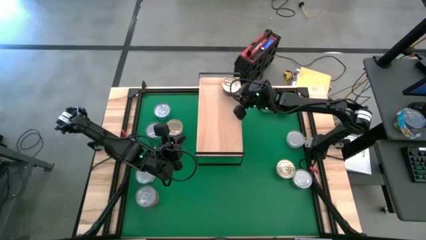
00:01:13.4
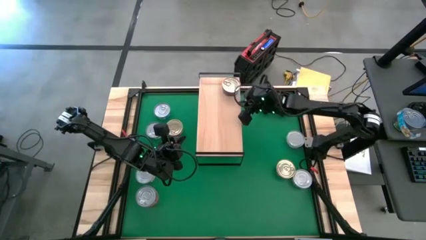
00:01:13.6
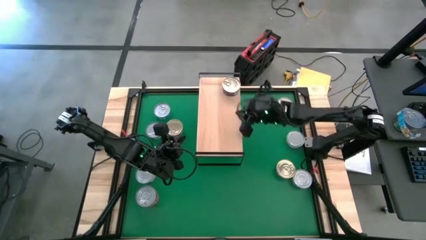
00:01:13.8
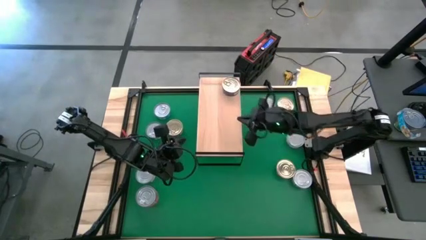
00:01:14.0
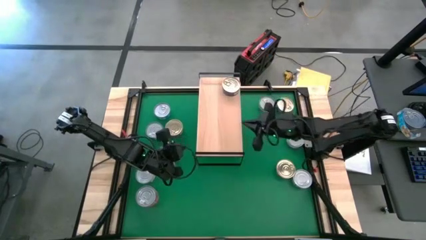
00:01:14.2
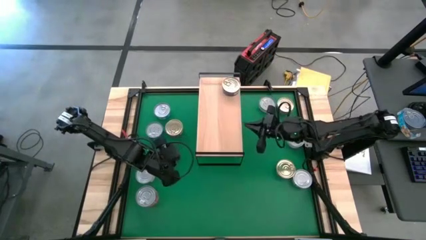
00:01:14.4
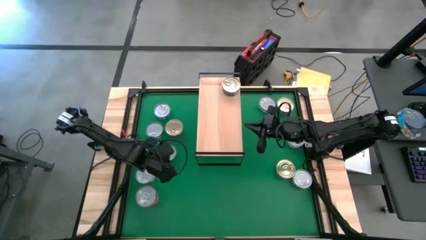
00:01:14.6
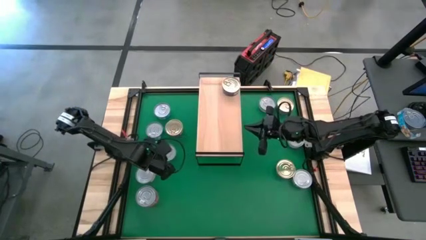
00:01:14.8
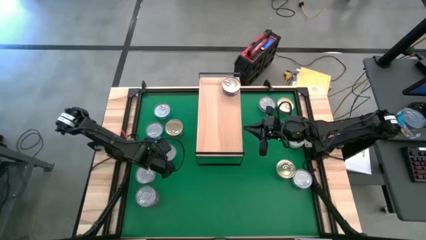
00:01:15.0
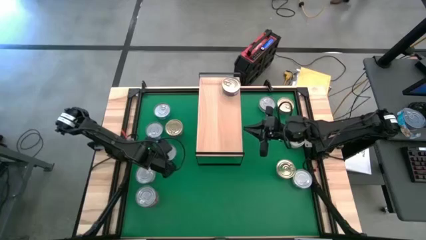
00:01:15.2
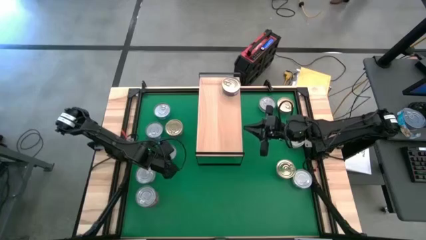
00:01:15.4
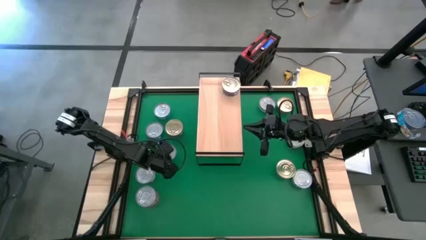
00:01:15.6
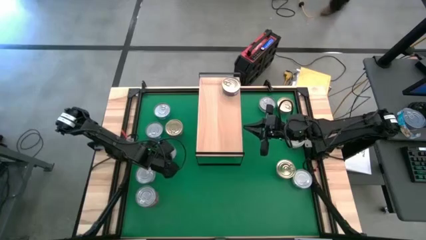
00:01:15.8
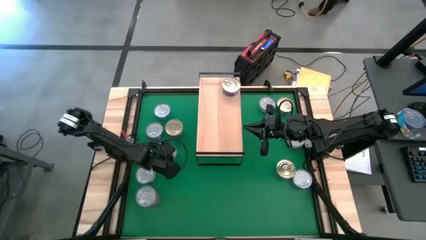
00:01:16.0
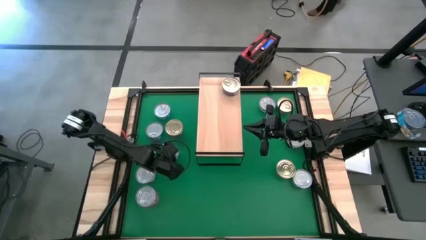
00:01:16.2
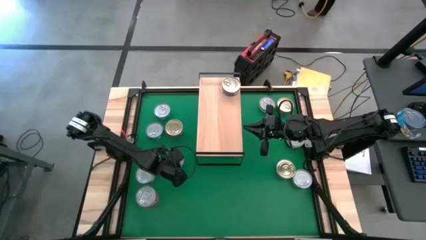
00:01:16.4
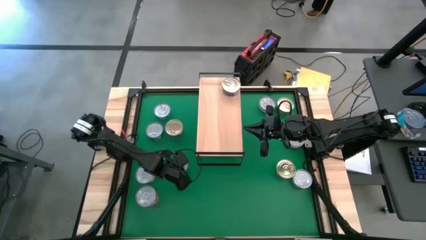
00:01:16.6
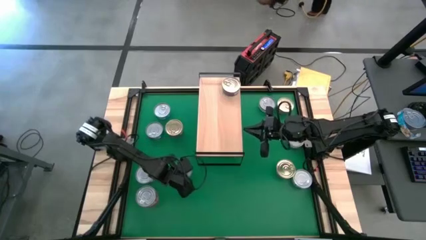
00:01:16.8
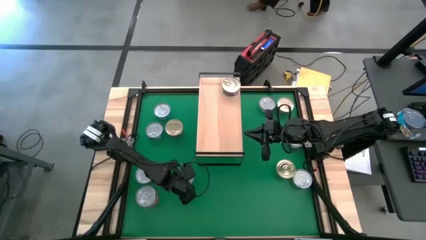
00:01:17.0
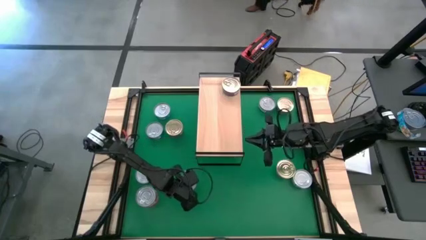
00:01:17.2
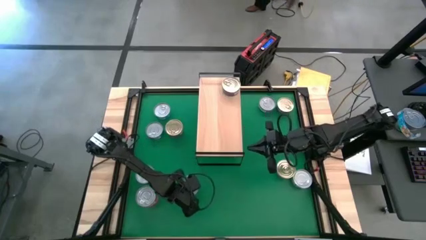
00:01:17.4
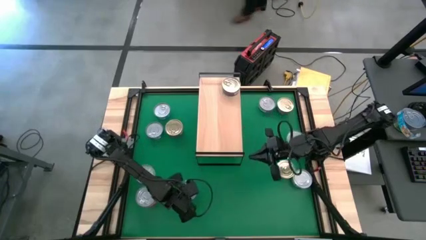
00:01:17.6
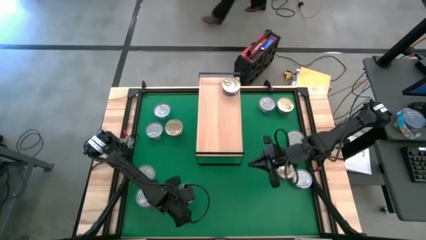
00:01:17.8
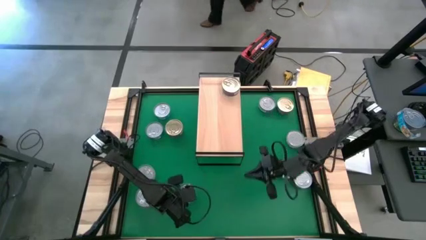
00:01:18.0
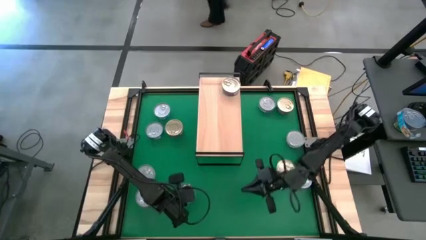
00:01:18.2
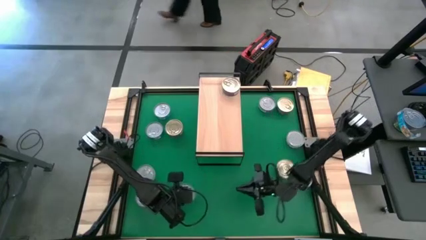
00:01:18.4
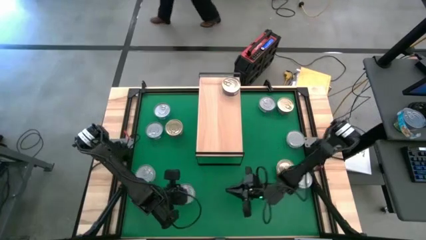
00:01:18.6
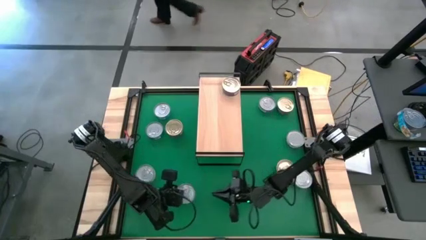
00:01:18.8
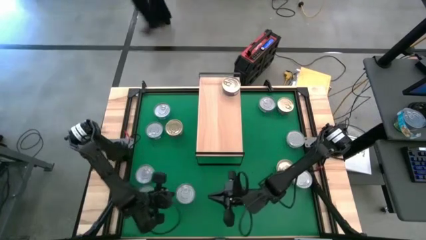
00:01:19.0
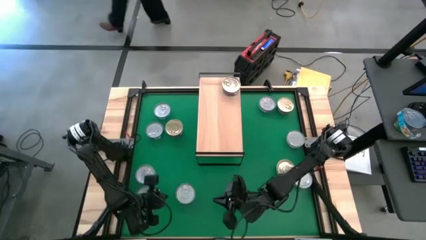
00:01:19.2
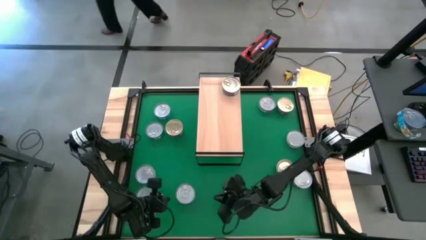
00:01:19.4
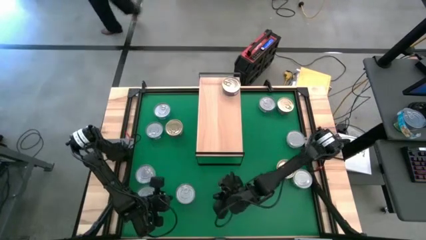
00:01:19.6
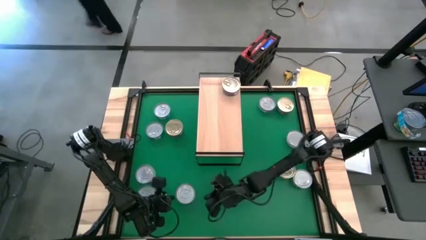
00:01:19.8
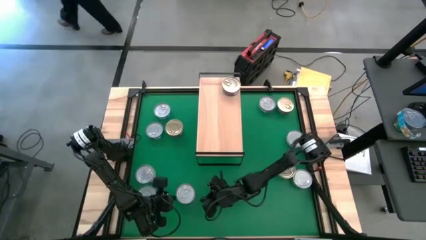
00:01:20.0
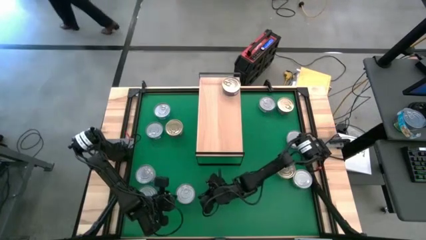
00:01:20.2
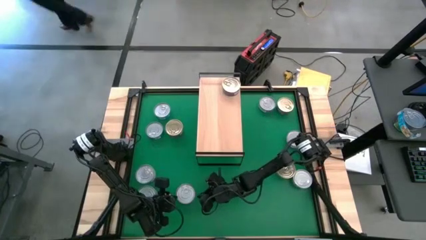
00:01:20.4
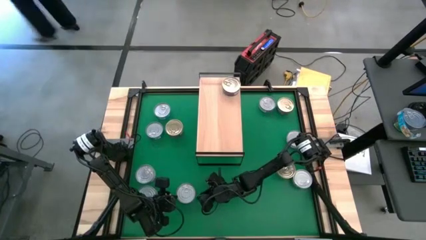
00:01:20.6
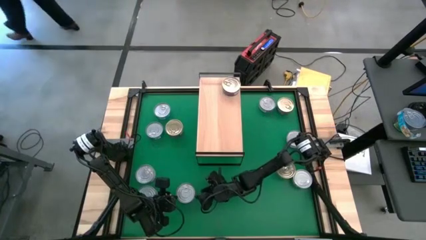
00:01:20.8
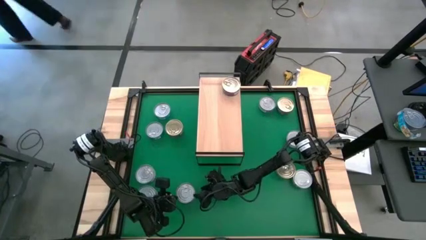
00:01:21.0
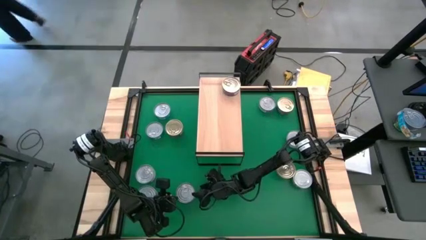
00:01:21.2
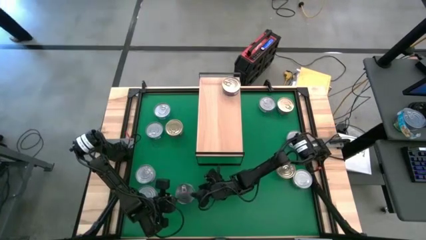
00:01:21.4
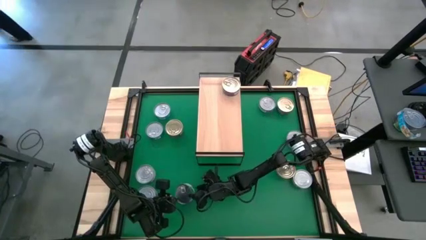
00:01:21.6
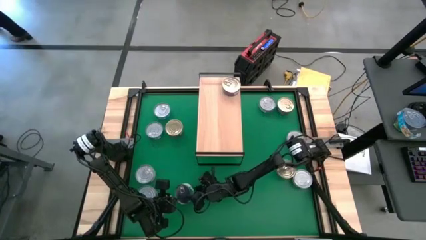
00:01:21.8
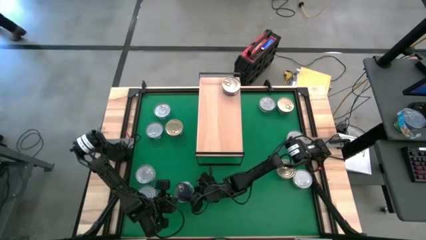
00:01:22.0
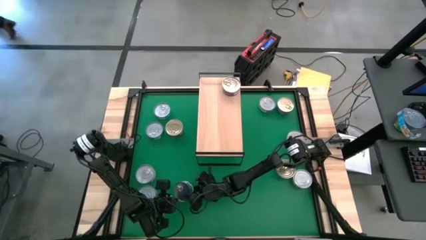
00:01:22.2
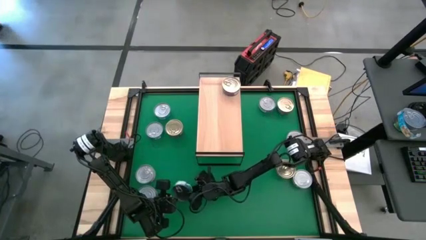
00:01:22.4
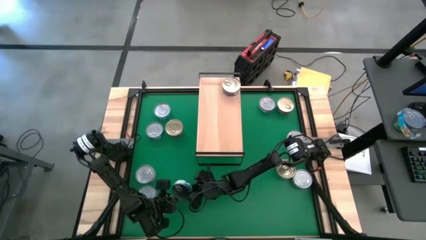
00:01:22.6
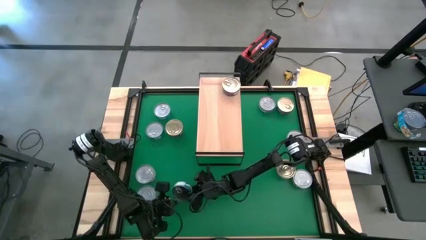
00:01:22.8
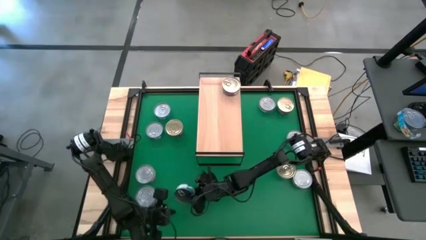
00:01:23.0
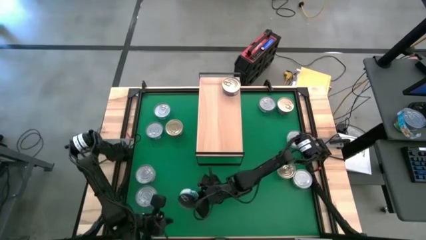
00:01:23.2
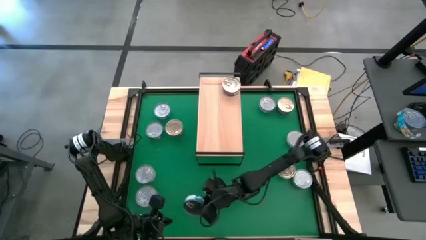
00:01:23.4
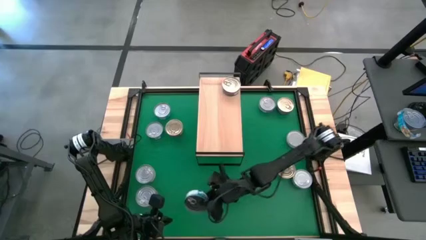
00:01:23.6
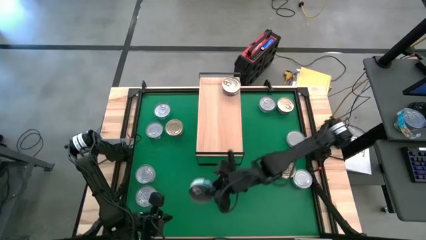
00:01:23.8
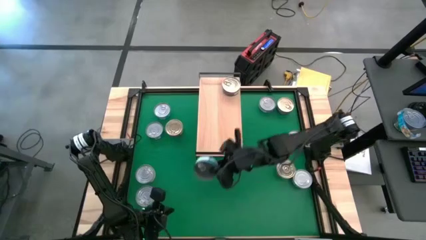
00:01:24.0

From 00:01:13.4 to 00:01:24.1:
Task: Stack canned seafood by type on shelf
Put the bottom light blue tuna can on the shelf
